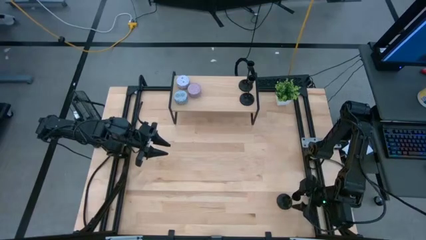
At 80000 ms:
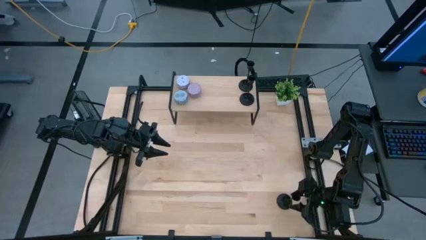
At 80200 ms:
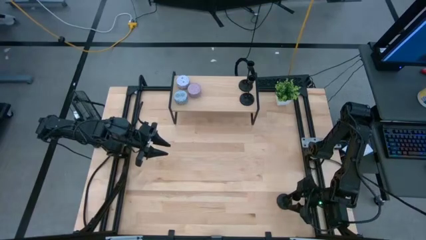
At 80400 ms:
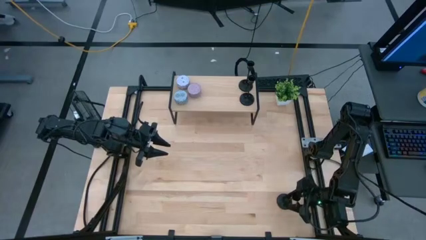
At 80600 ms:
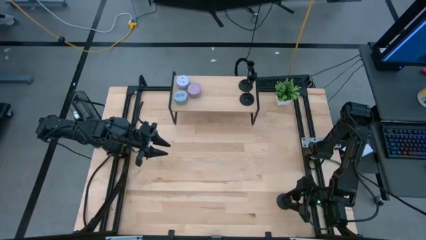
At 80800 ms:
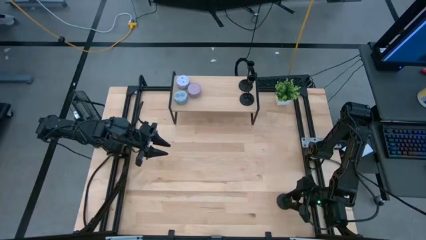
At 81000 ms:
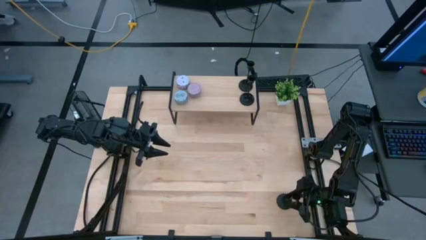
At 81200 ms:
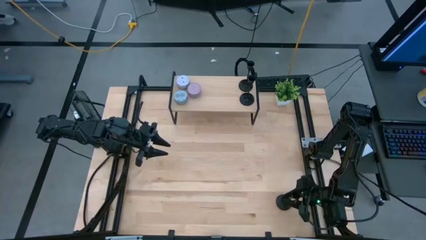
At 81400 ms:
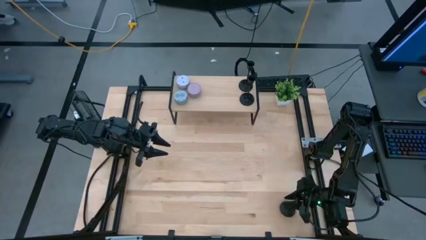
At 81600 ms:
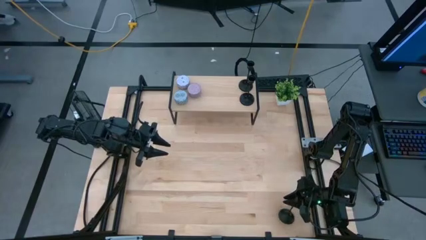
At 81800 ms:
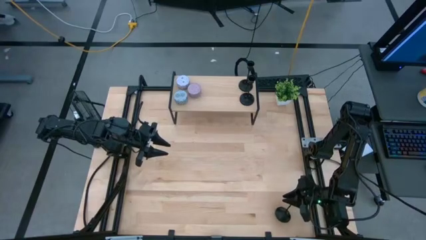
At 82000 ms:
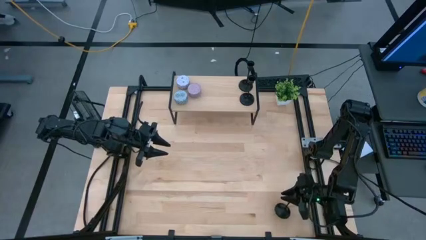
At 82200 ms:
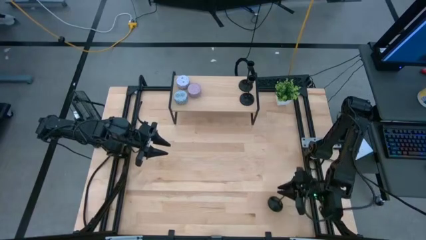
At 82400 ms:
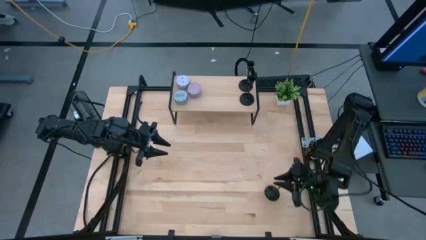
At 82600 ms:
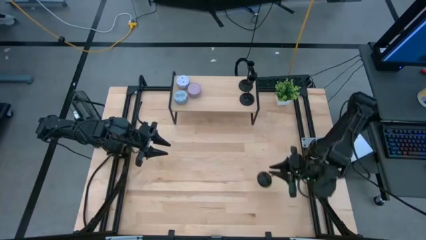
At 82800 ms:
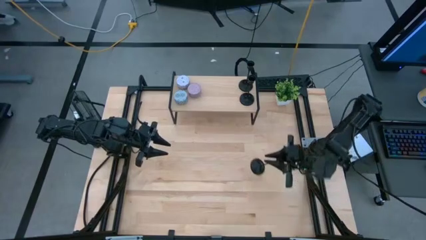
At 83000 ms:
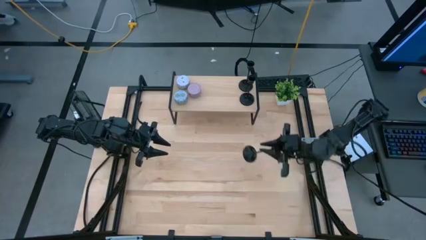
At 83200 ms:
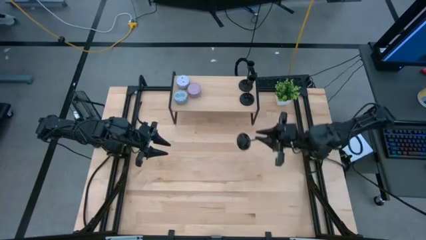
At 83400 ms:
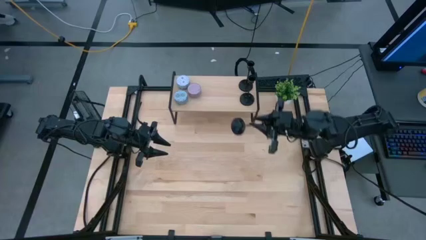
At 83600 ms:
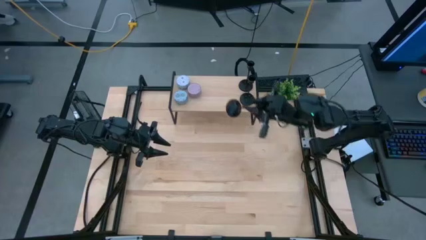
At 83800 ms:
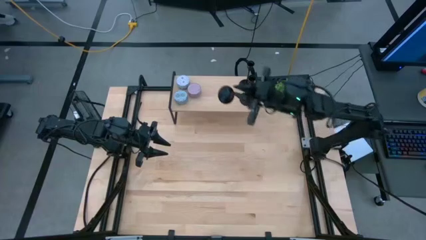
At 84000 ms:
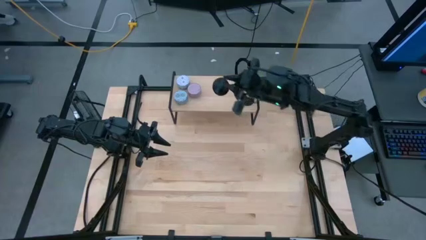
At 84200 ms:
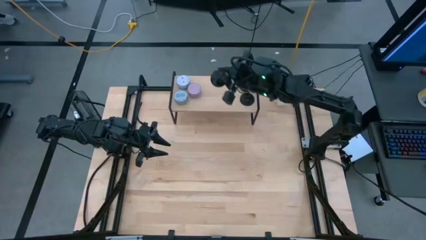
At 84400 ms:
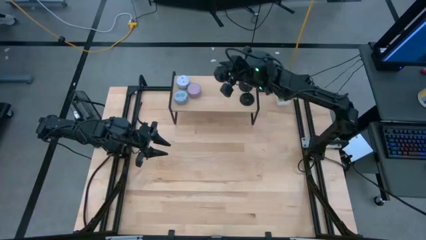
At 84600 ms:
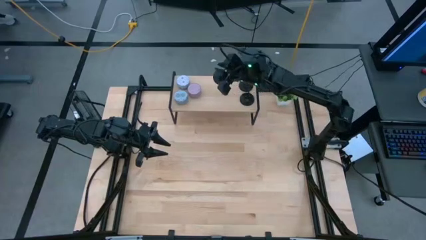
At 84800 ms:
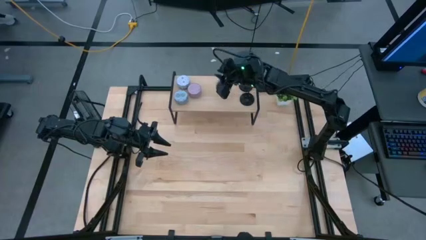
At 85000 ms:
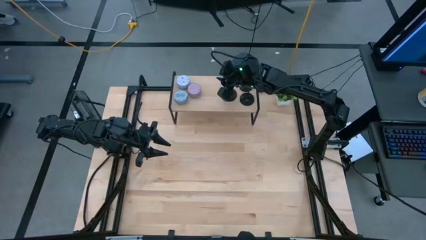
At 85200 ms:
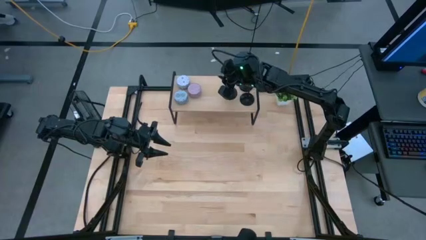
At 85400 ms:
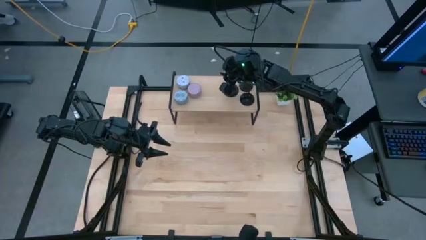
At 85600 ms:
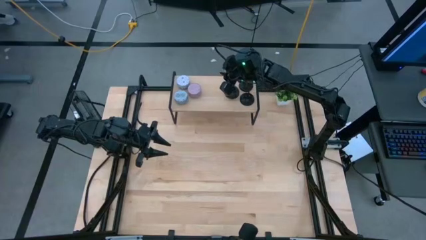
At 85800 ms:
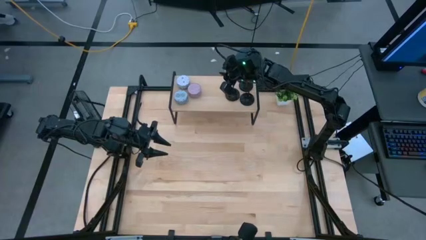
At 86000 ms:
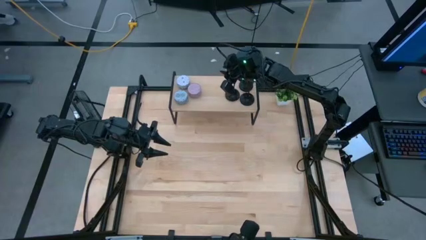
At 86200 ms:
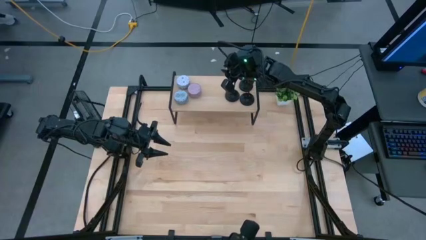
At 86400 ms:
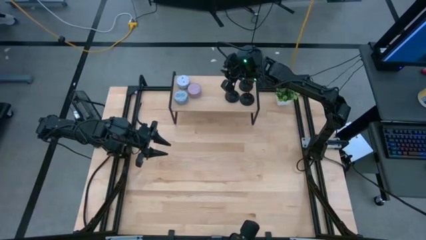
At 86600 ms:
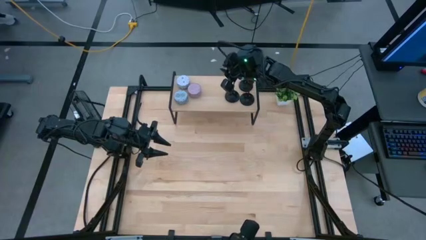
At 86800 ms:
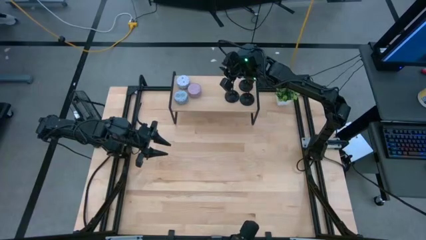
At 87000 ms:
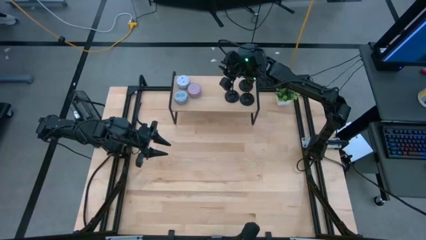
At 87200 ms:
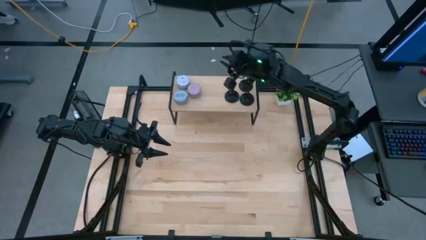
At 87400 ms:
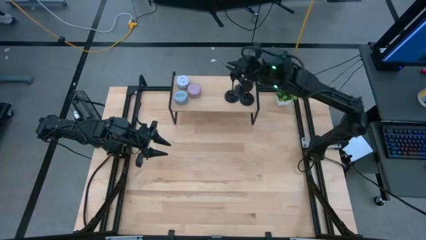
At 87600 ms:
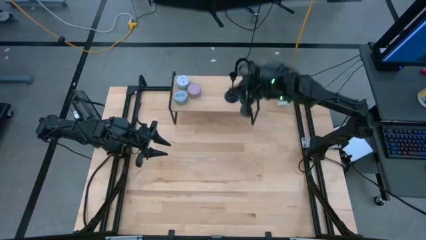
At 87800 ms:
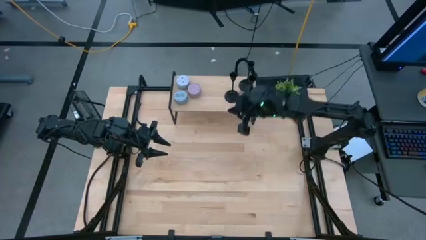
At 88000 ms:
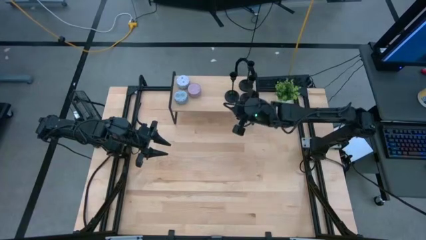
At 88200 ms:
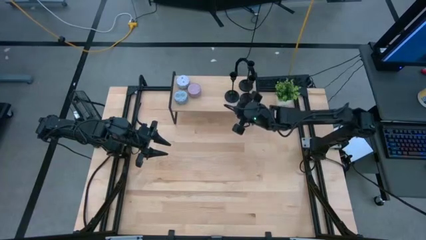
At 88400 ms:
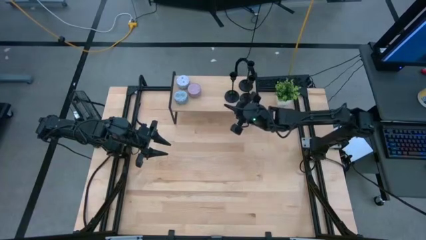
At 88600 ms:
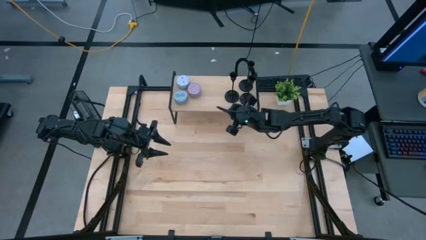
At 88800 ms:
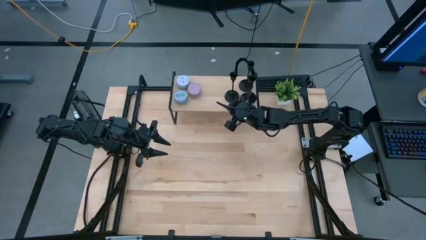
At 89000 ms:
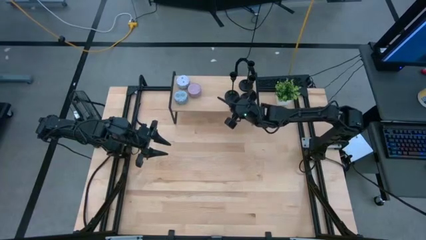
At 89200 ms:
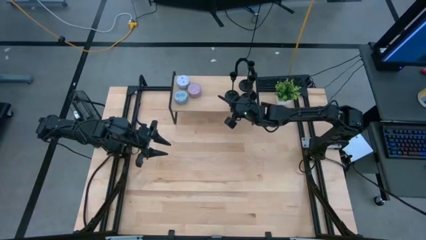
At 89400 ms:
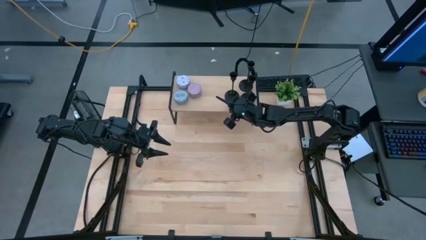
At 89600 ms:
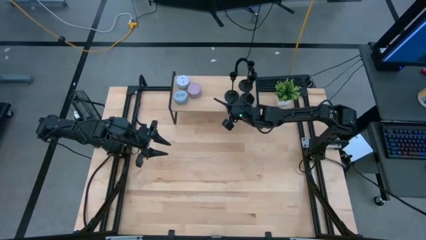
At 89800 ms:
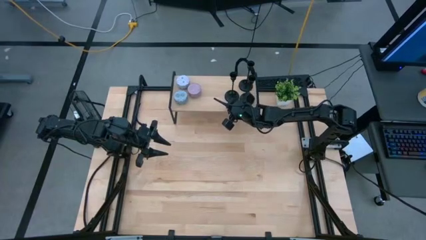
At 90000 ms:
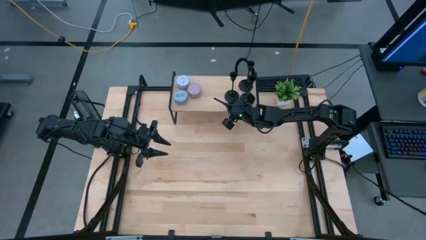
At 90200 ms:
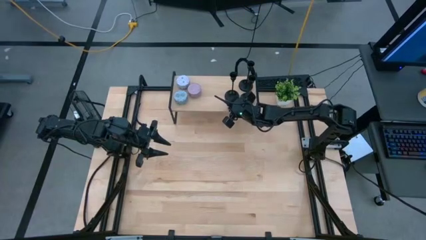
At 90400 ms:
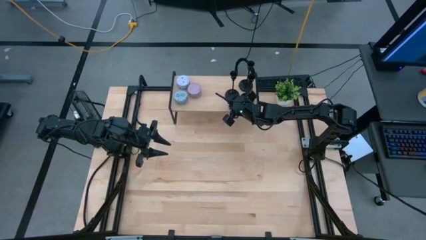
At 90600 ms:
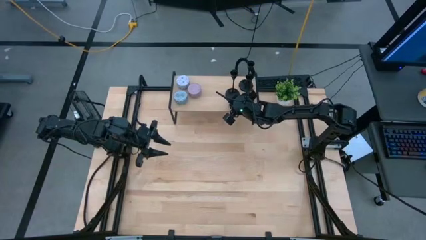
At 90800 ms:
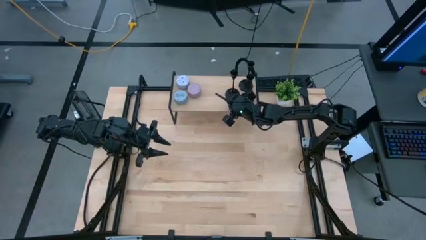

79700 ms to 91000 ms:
Task: Pick & Place candle stick holders
Put the black candle holder on the shelf

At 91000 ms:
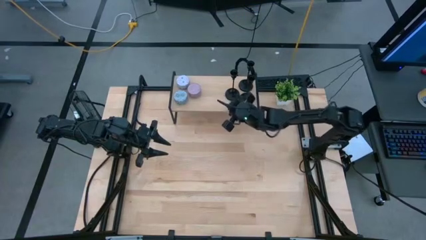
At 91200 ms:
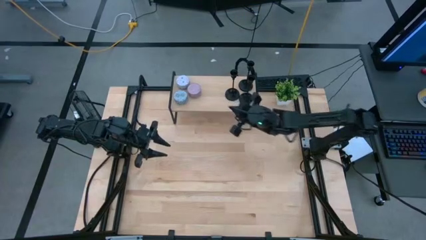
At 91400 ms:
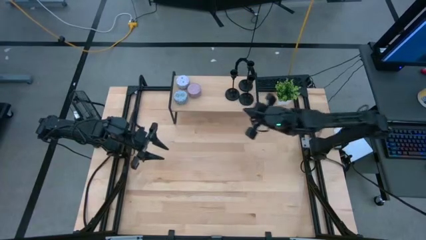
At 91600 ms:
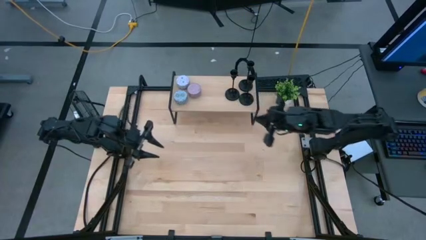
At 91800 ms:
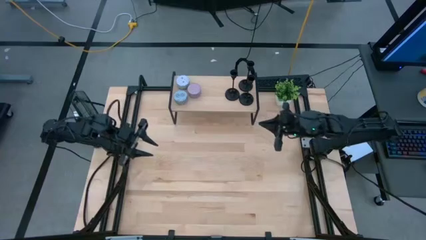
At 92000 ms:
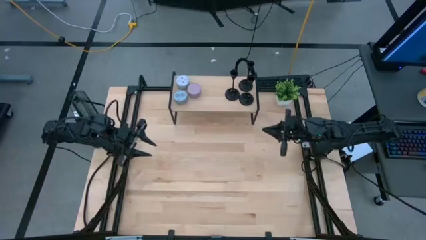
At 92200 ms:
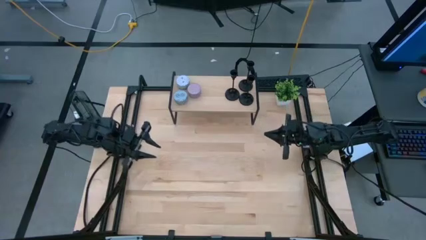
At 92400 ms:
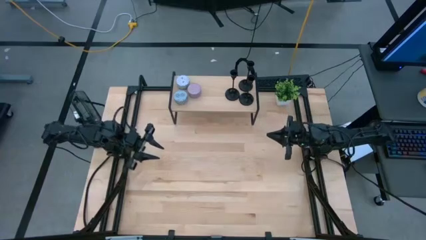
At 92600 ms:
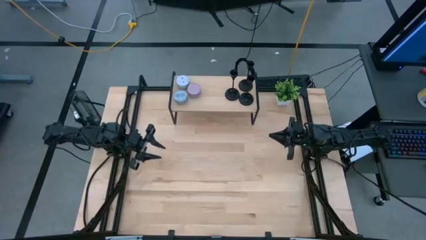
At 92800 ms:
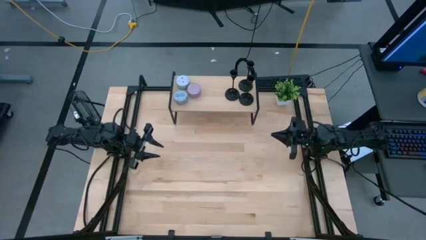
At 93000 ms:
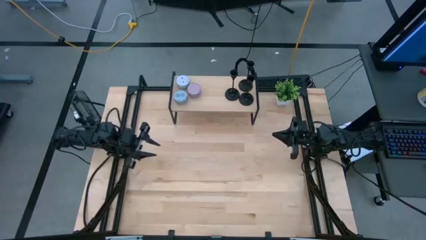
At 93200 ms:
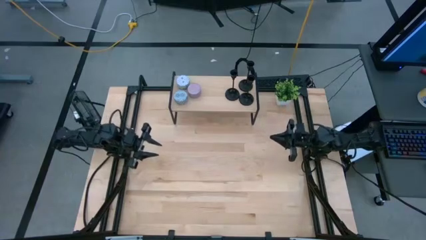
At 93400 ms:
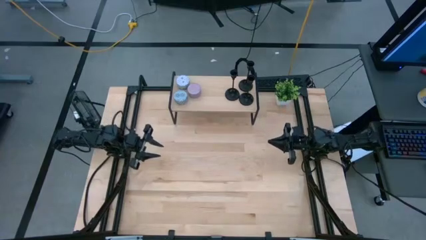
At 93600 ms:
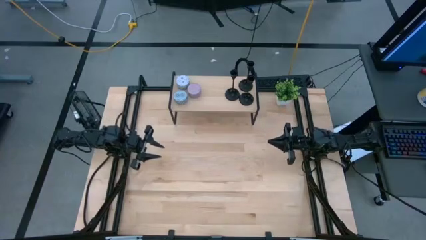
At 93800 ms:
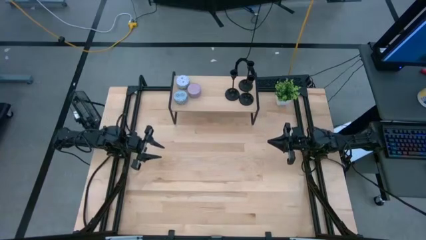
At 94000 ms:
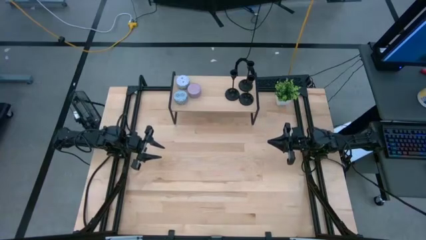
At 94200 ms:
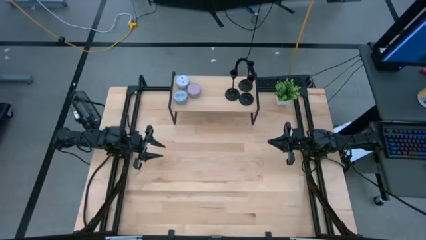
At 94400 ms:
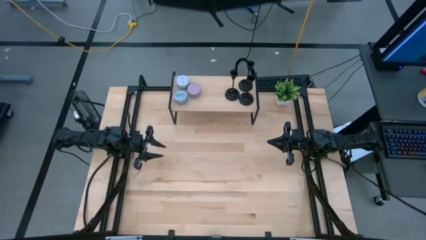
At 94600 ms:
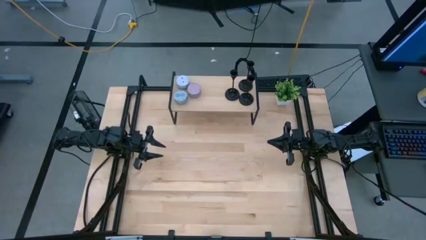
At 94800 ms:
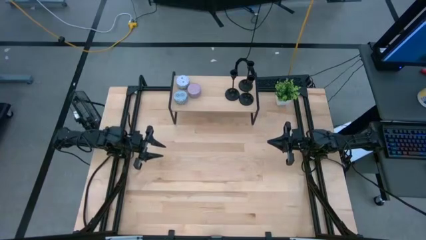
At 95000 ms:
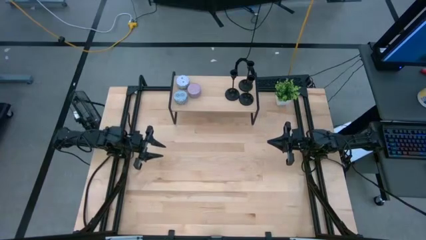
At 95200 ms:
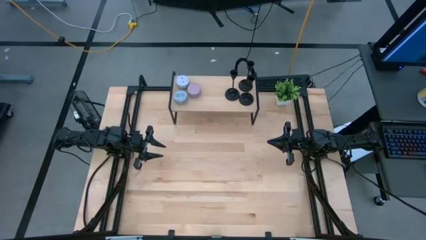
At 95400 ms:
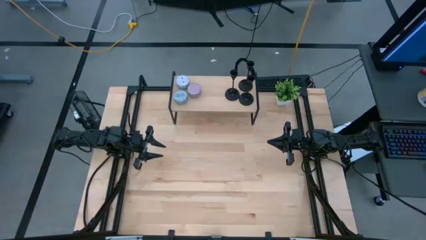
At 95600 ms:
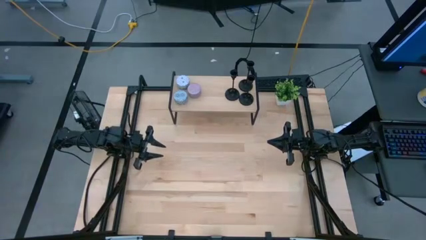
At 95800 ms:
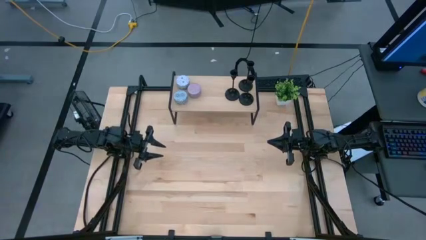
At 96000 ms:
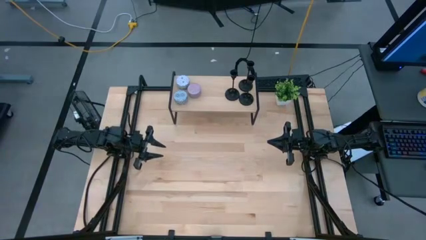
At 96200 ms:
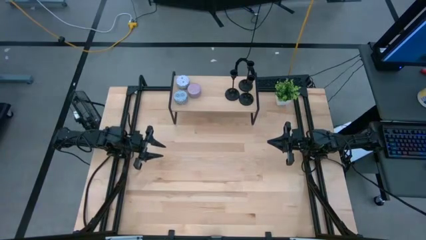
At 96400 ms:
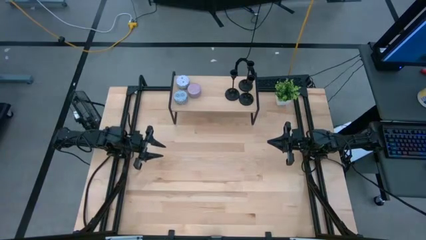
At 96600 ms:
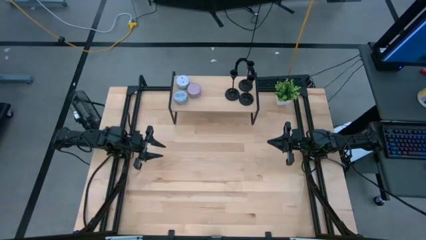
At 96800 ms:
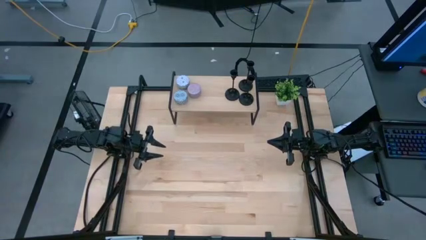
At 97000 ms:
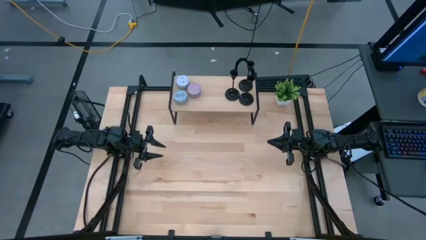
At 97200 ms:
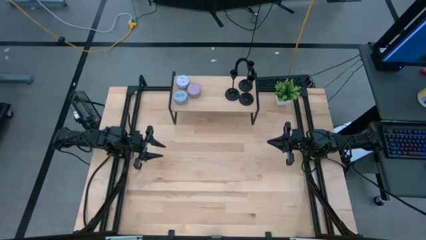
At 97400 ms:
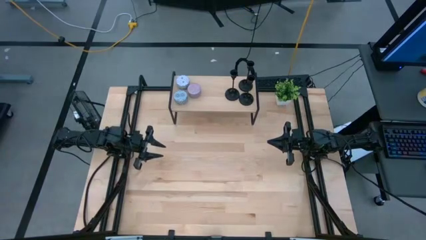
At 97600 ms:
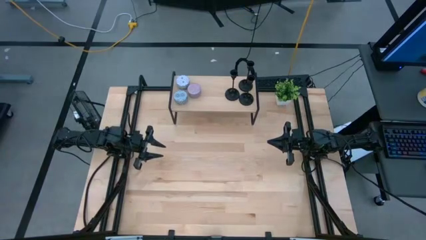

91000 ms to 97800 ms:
Return to Home Position
